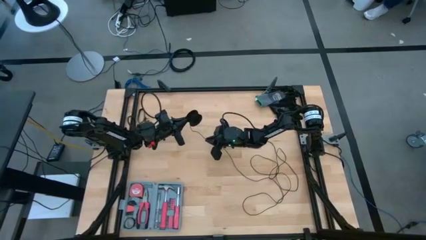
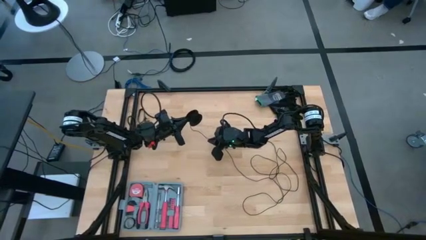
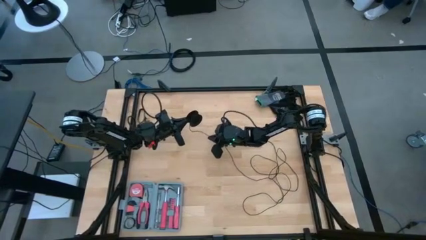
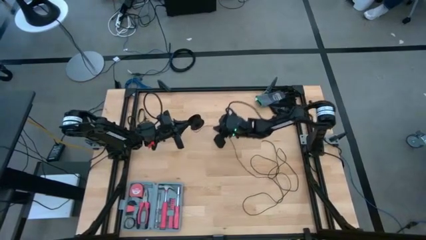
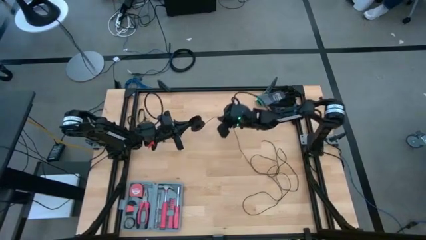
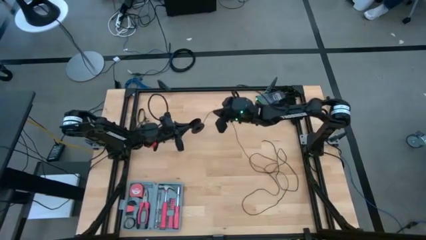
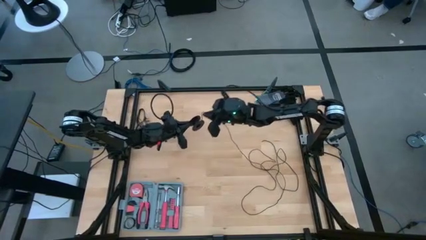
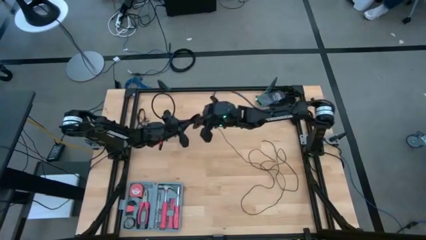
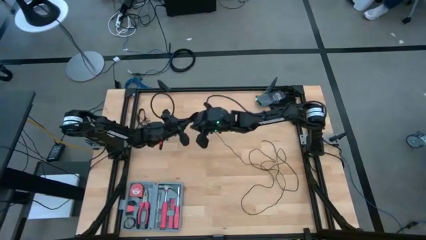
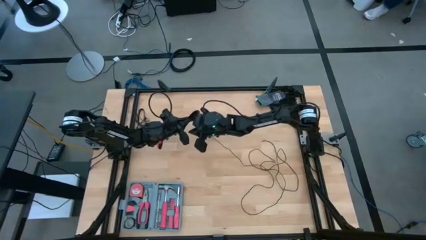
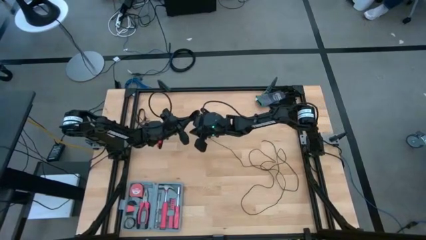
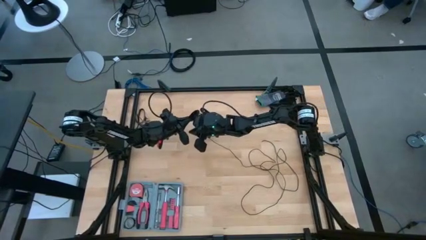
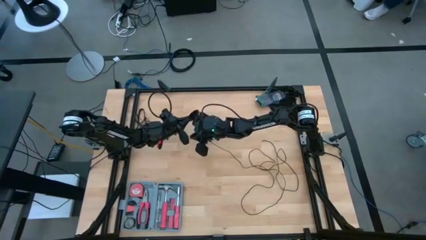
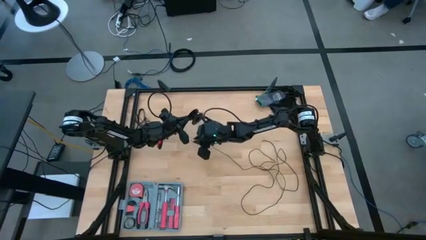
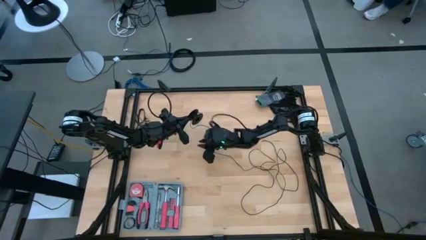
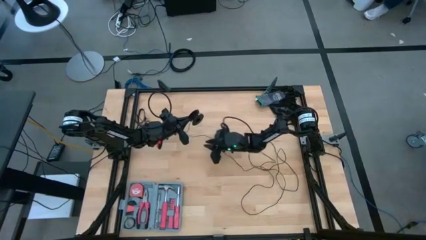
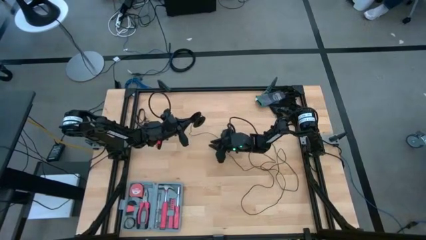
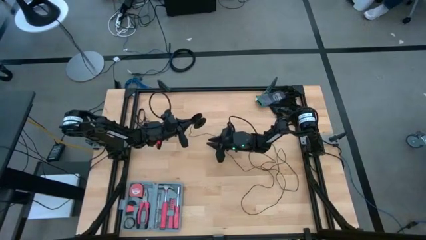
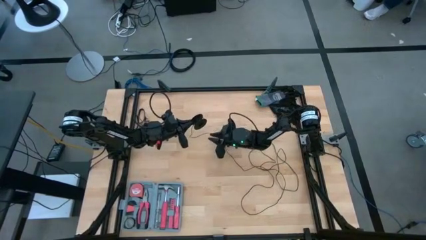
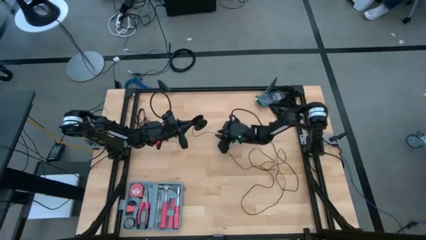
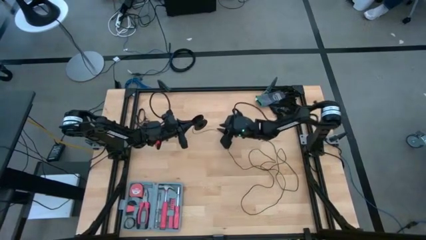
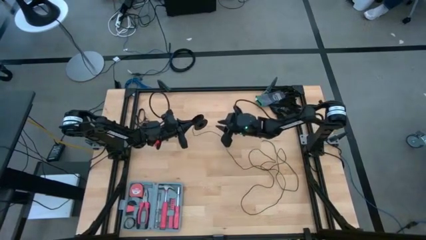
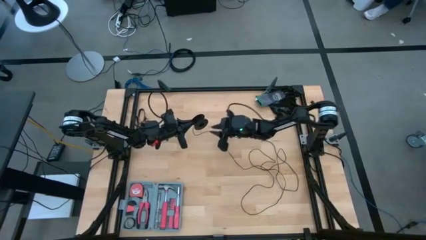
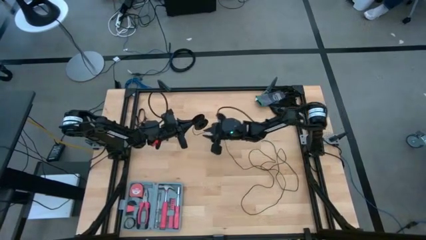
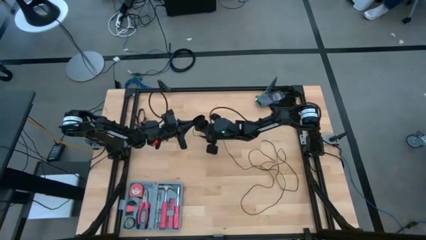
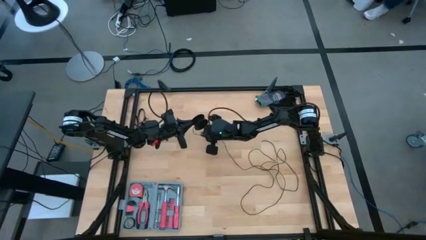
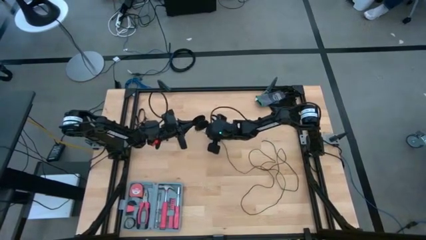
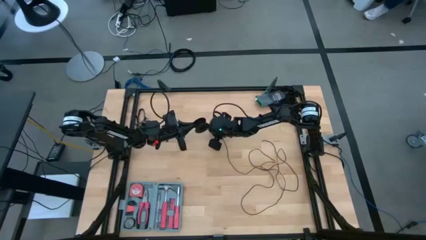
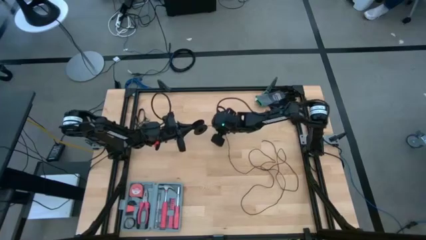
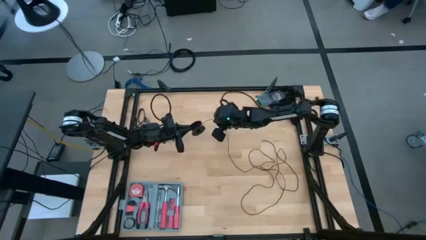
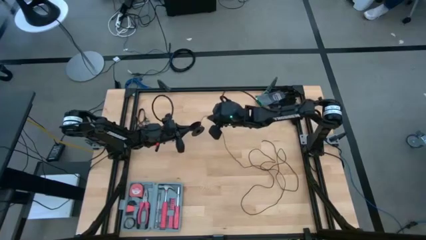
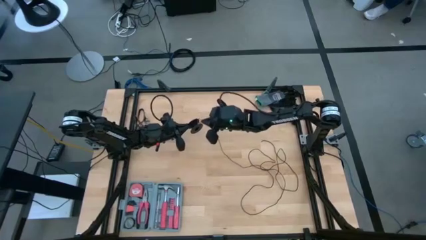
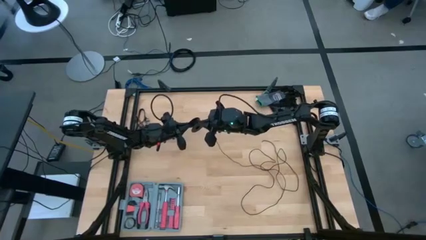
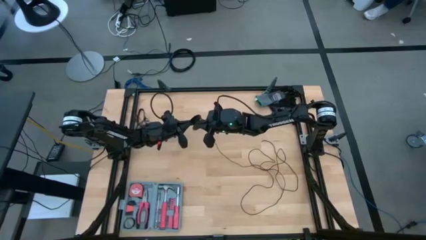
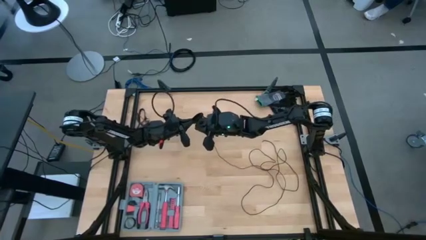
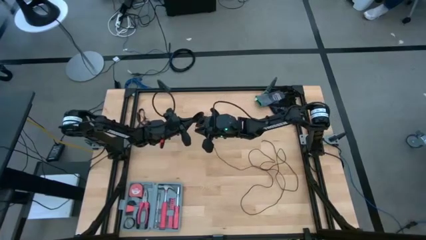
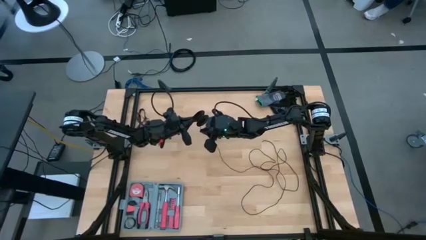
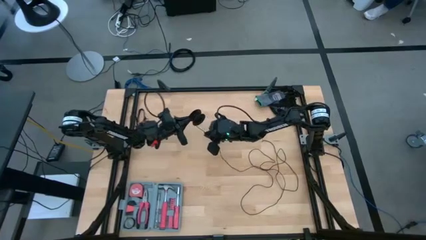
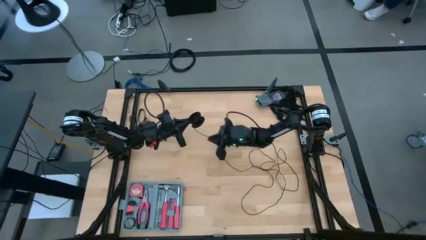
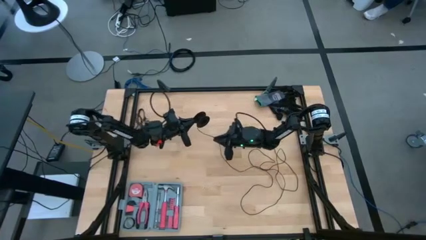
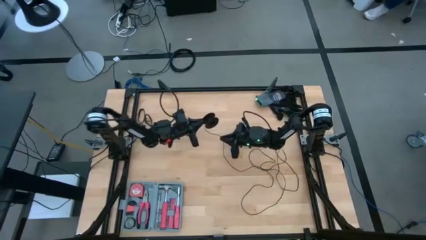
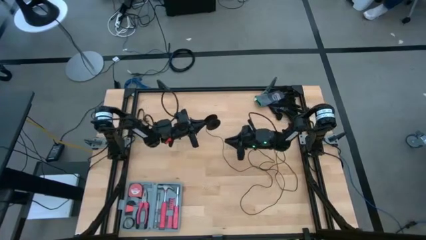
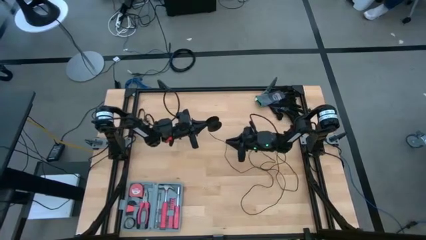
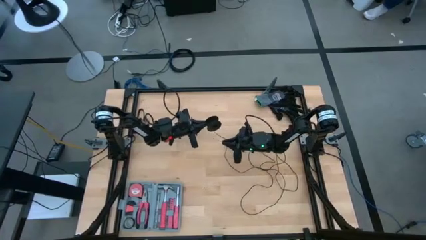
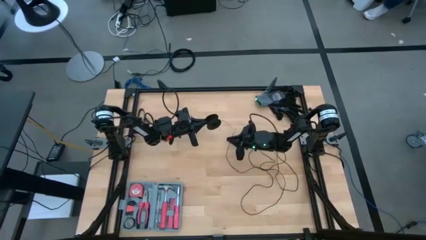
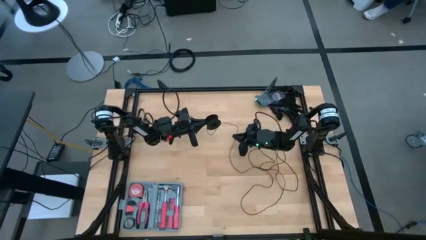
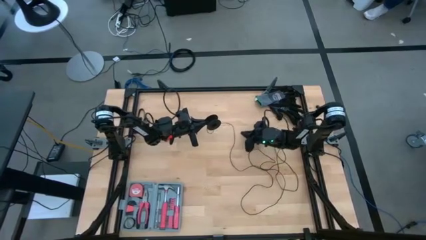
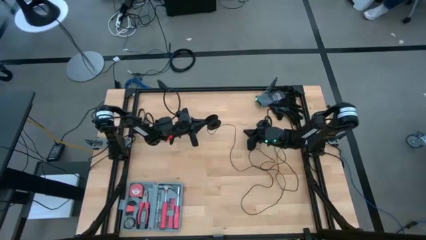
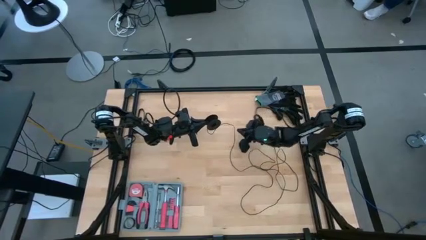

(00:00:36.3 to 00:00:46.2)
Task: Coil cords
Coil the black wire on the spool

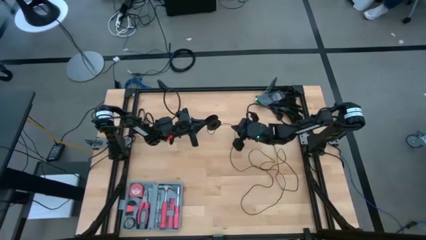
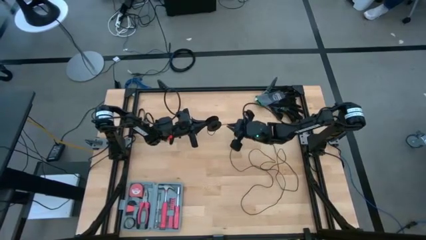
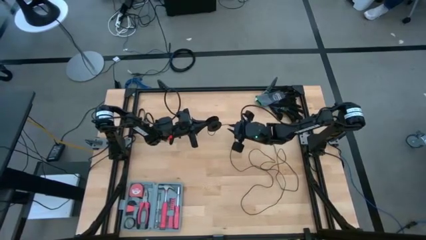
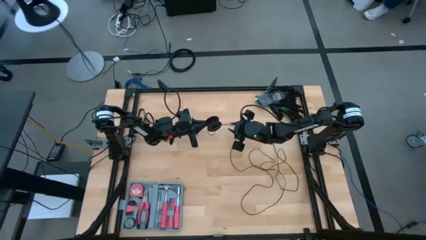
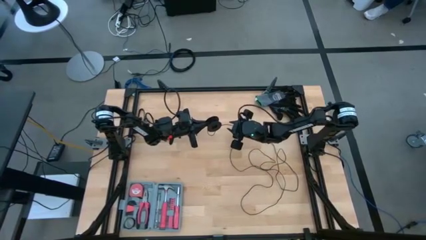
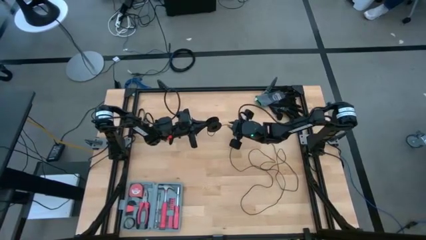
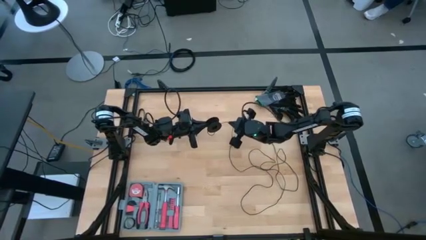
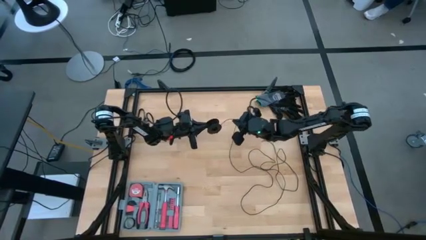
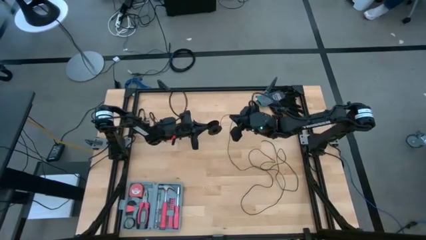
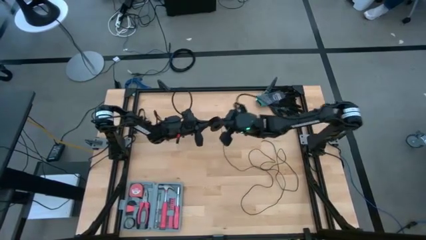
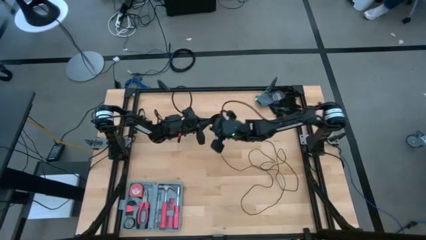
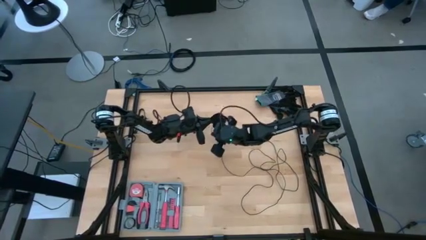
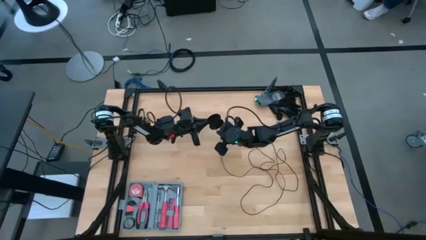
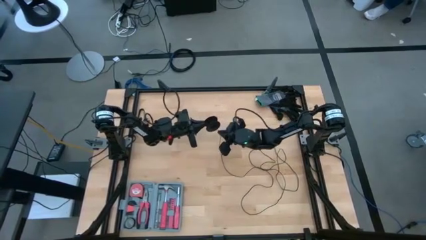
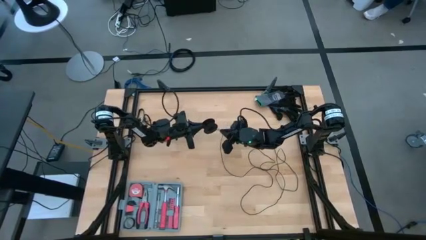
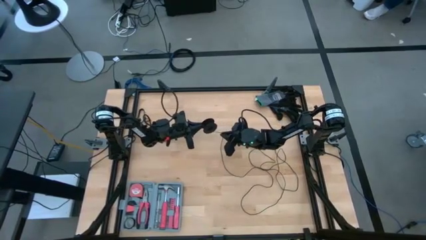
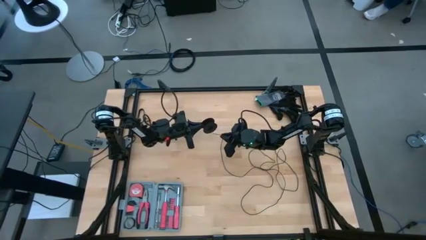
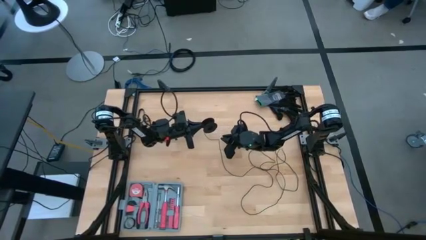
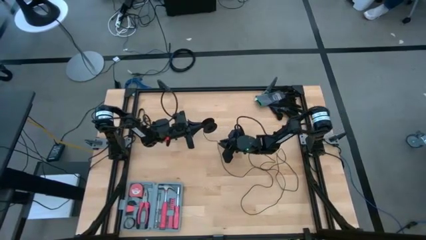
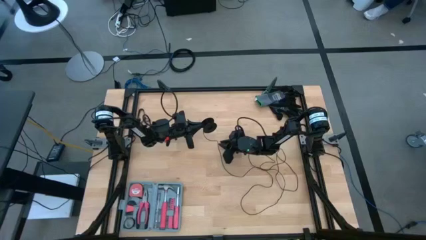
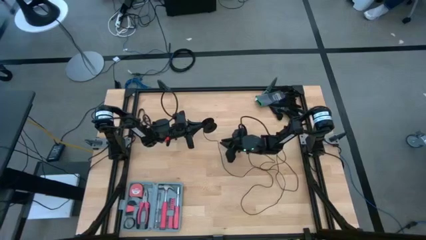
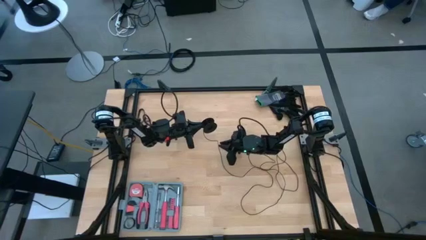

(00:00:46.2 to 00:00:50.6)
Coil the black wire on the spool
